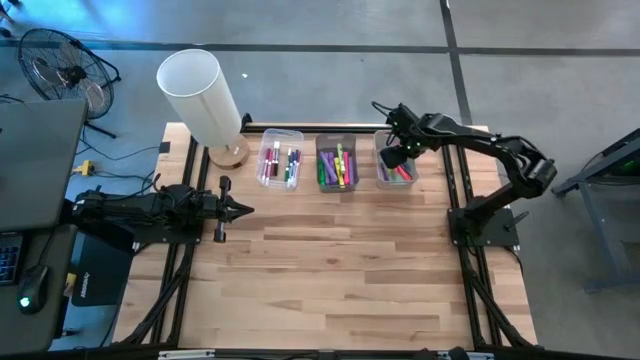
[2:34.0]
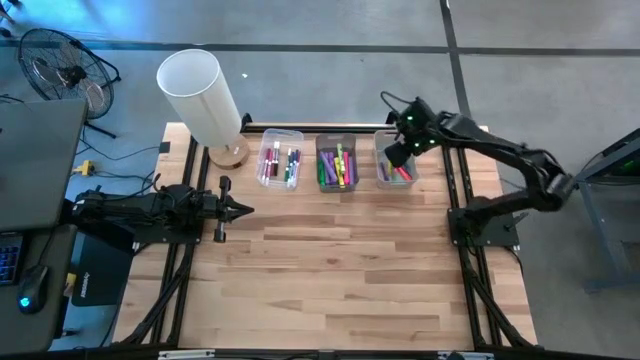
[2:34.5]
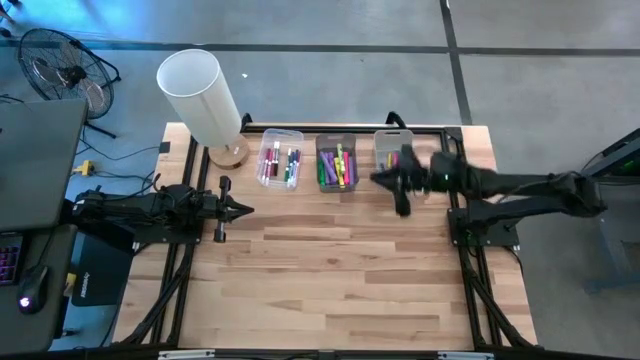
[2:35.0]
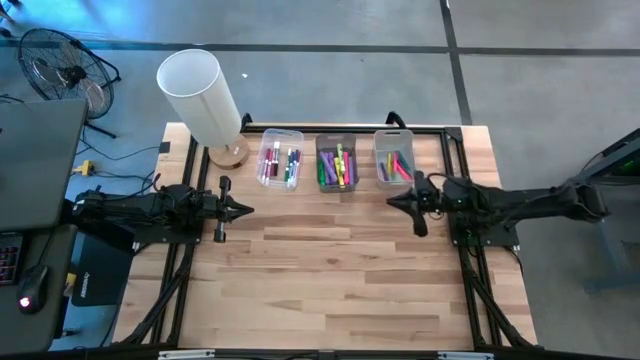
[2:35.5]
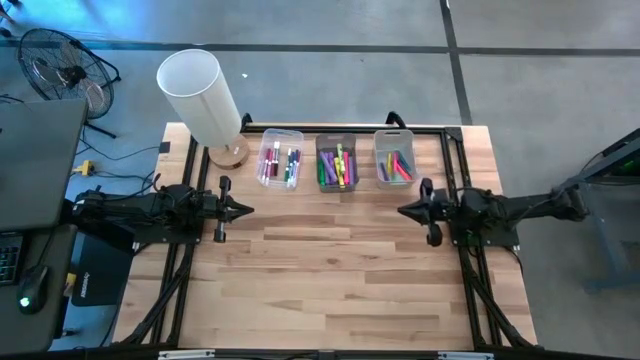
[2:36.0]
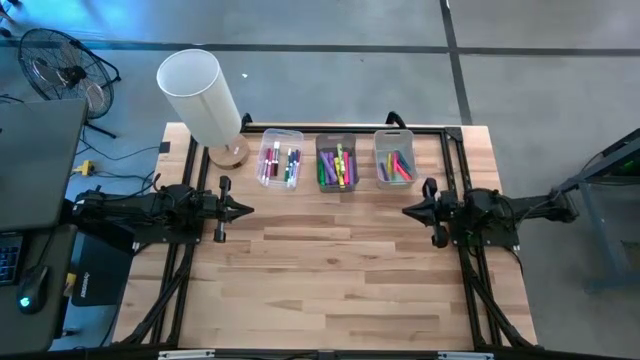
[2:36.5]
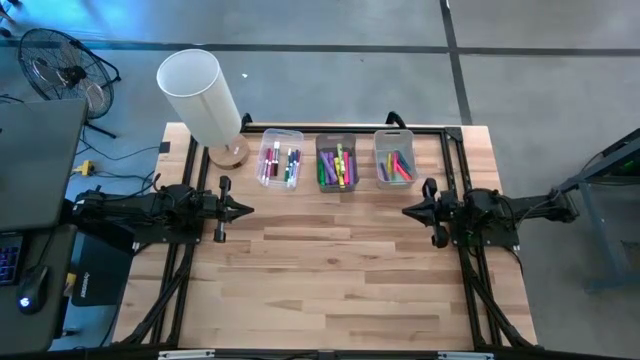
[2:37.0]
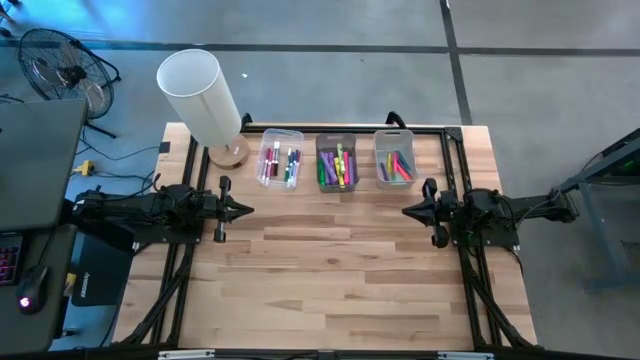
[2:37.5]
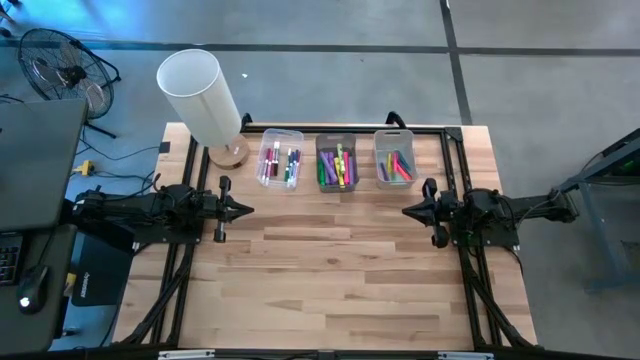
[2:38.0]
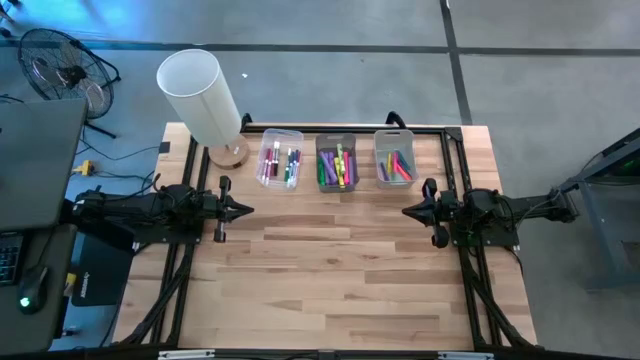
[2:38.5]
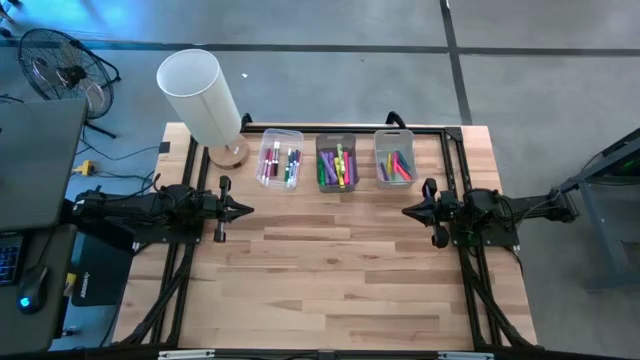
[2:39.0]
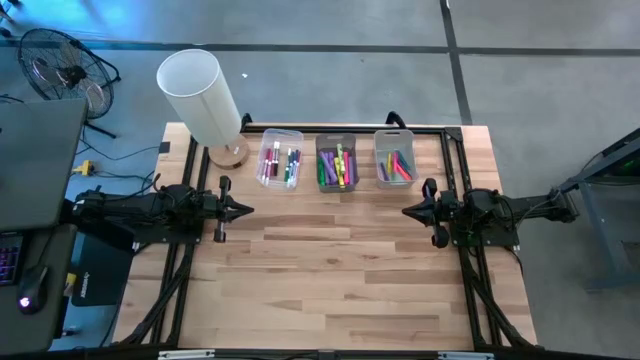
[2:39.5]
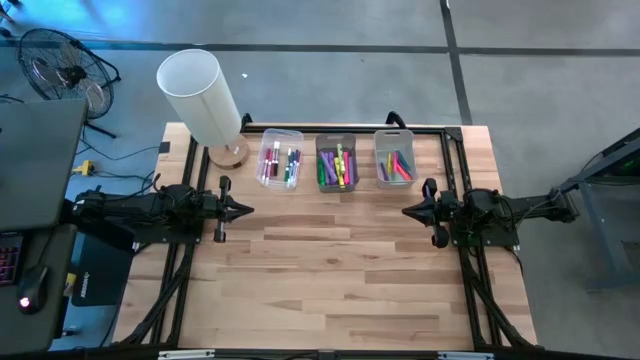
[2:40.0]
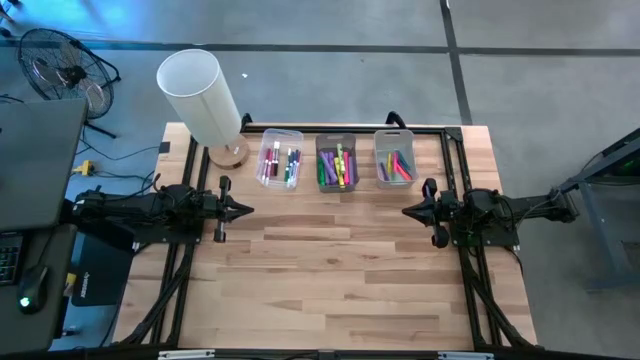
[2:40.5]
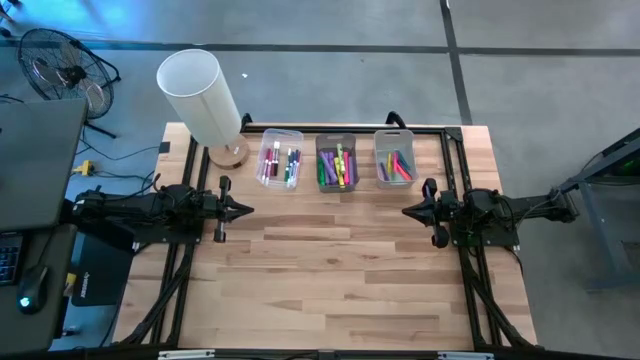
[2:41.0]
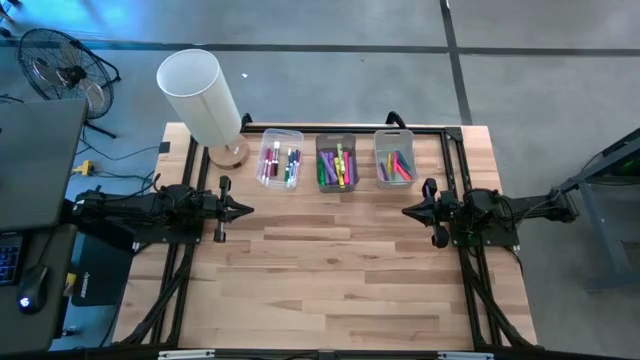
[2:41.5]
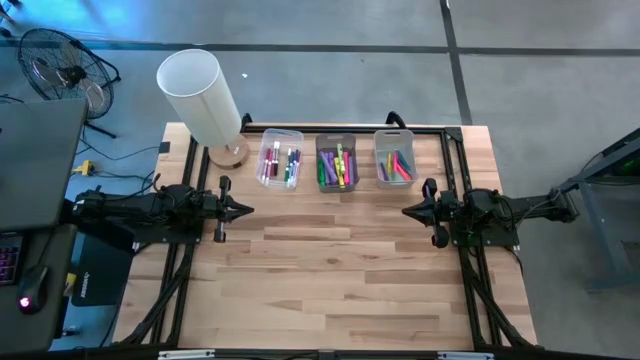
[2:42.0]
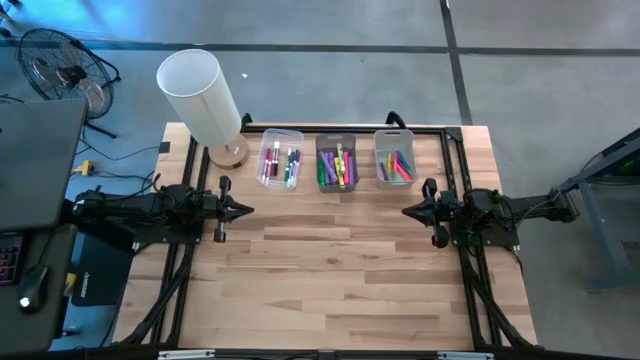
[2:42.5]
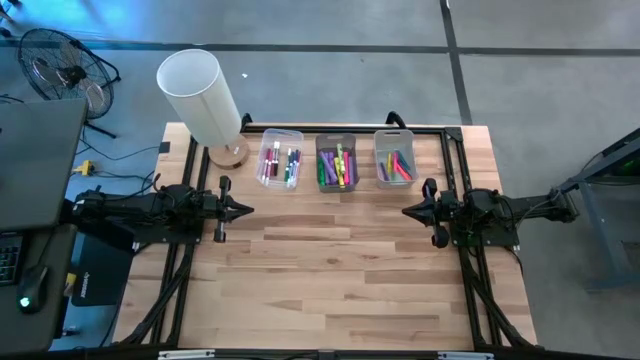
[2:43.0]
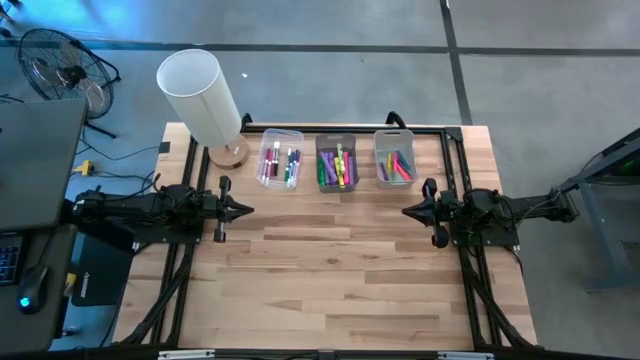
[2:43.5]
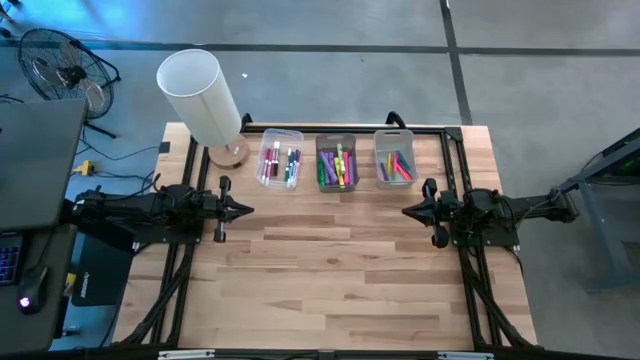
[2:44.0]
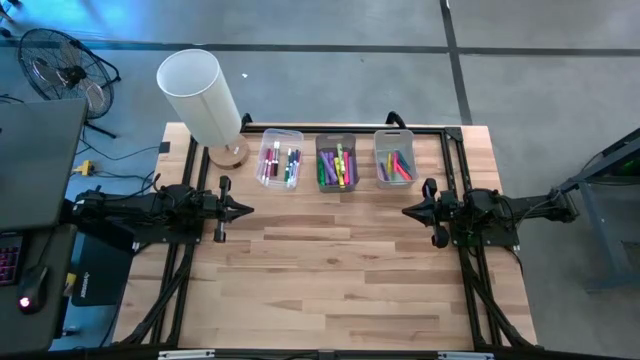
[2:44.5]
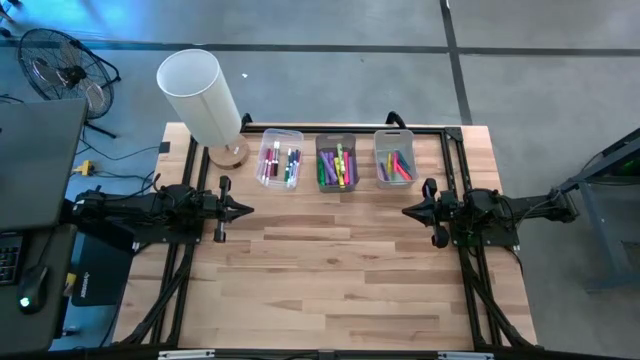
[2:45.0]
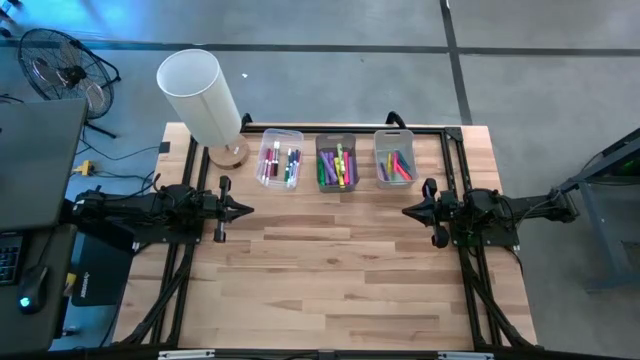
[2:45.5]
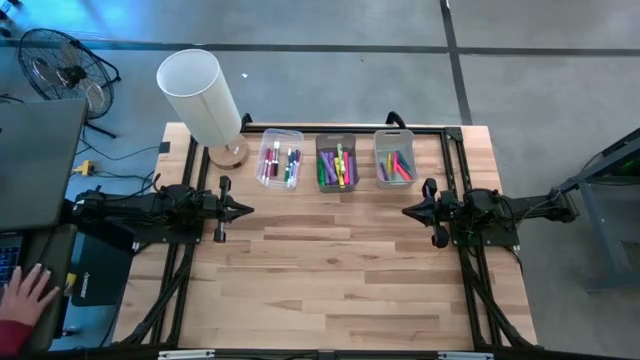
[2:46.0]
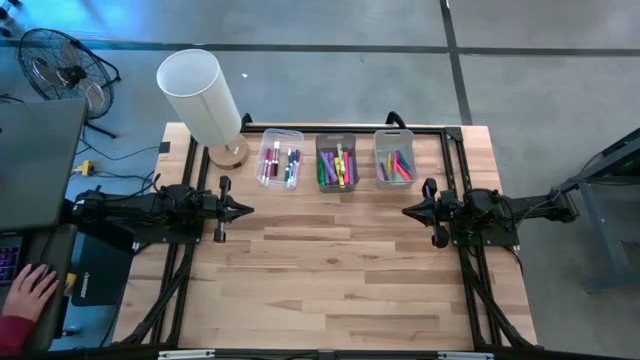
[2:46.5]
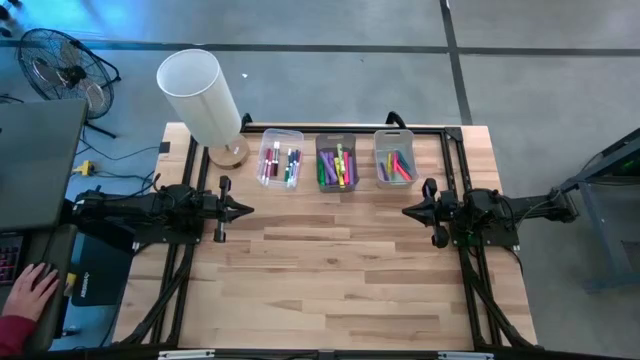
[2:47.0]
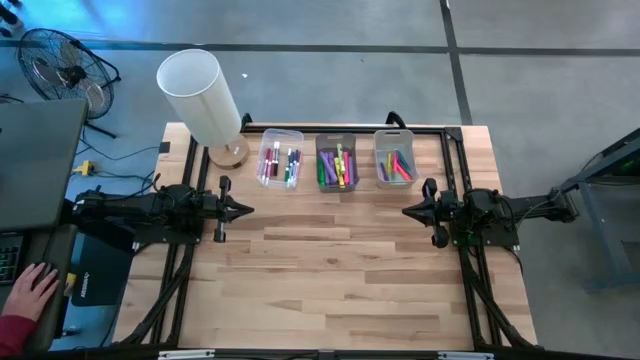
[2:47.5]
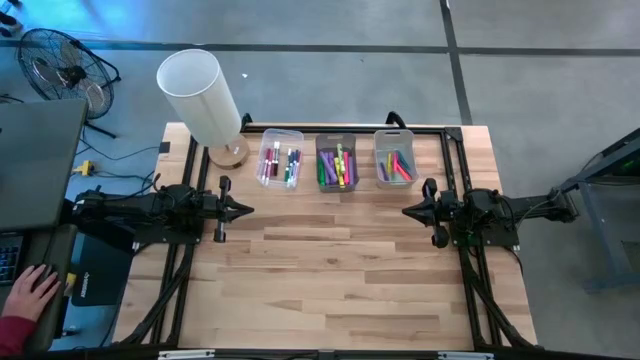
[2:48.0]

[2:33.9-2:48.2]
Task: Pick & Place Markers
Return to Home Position

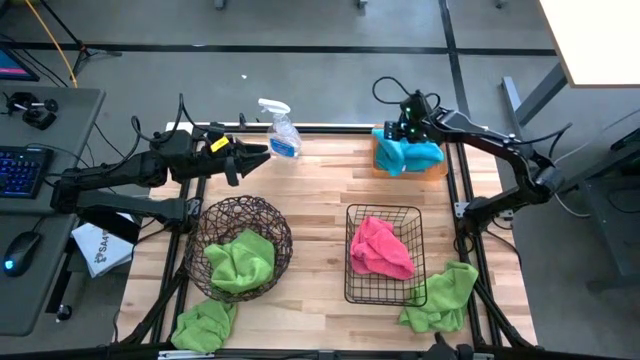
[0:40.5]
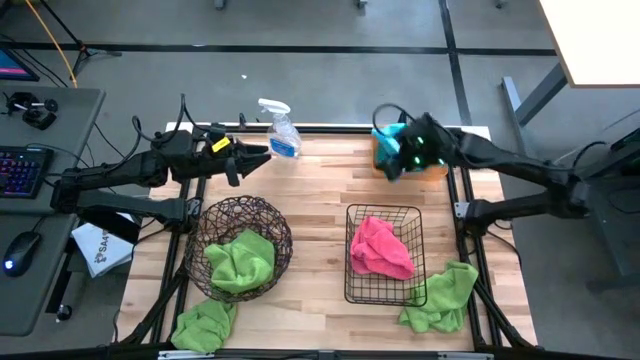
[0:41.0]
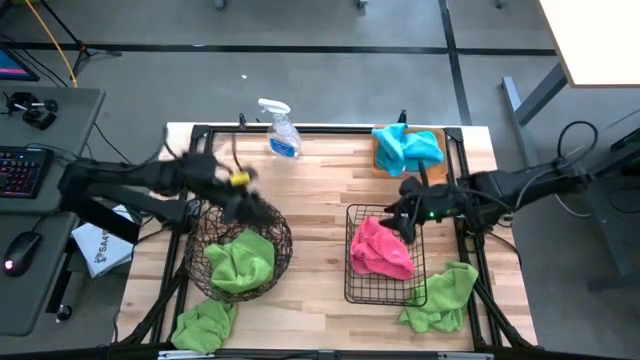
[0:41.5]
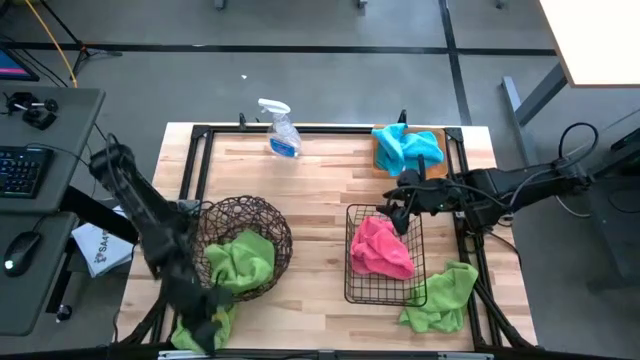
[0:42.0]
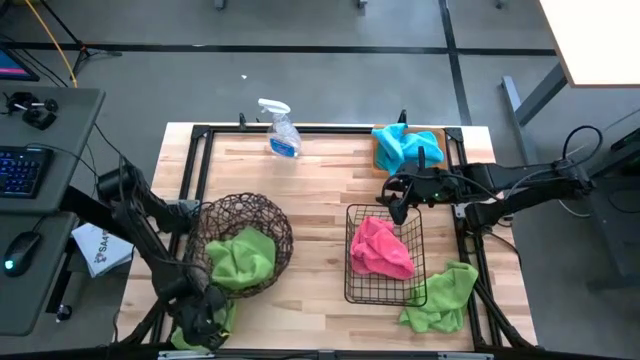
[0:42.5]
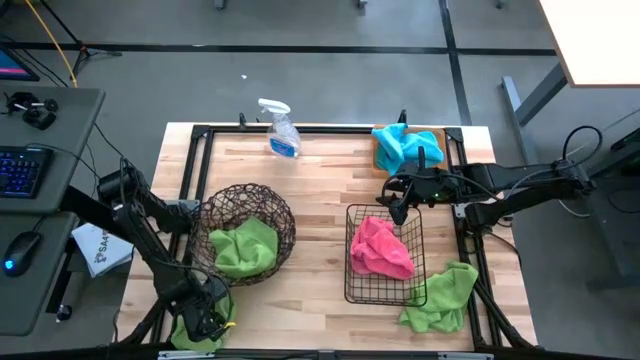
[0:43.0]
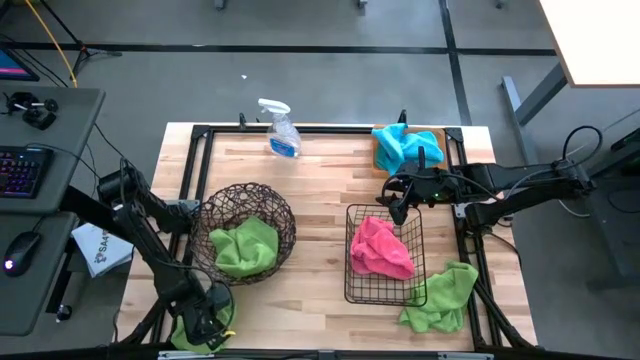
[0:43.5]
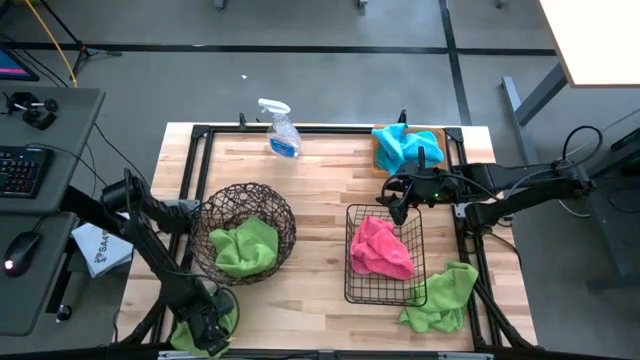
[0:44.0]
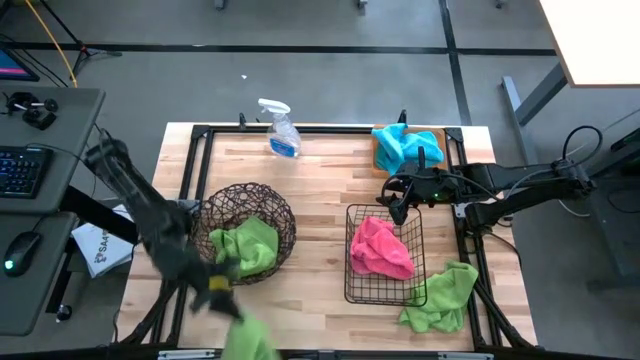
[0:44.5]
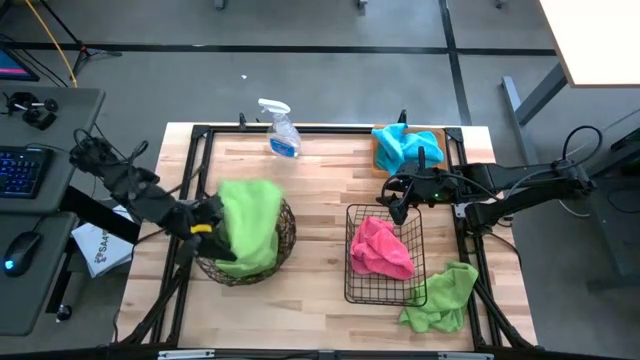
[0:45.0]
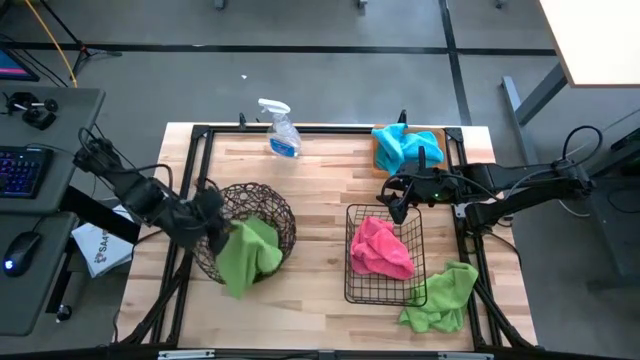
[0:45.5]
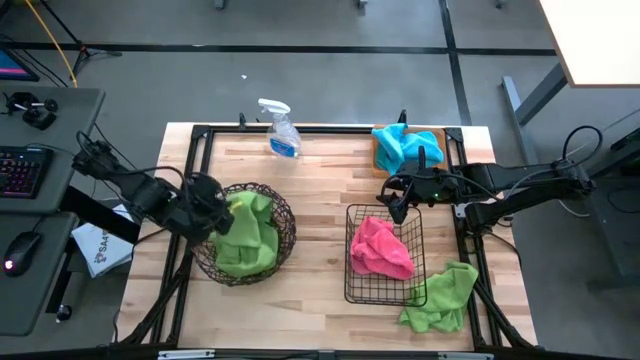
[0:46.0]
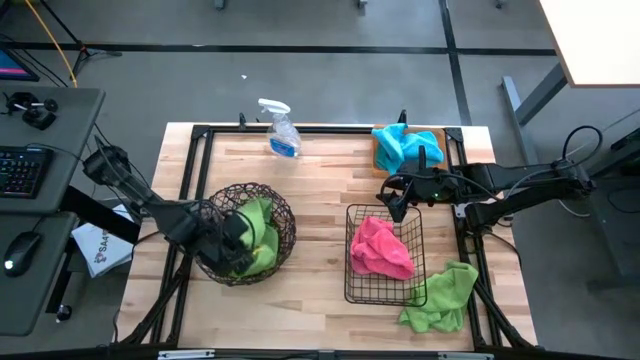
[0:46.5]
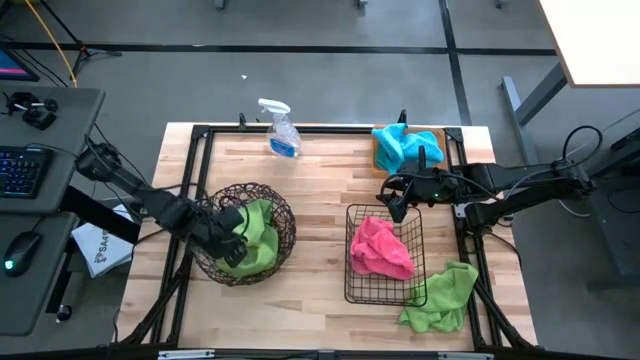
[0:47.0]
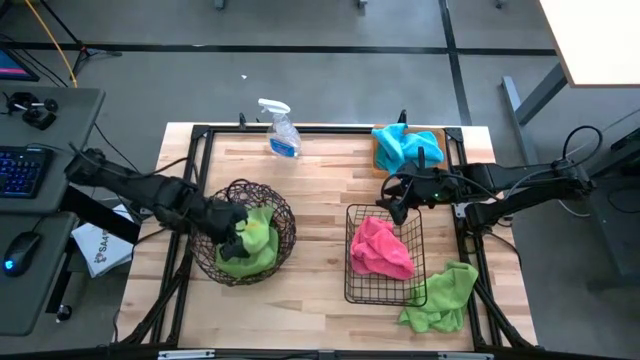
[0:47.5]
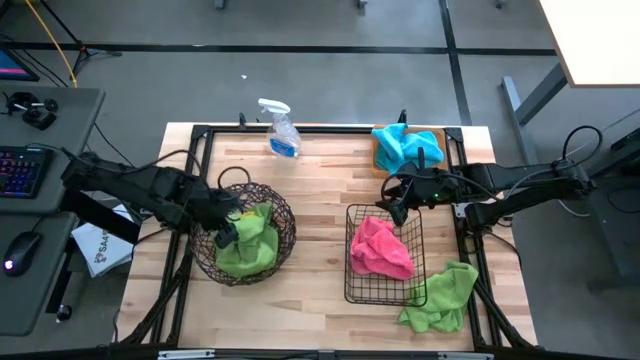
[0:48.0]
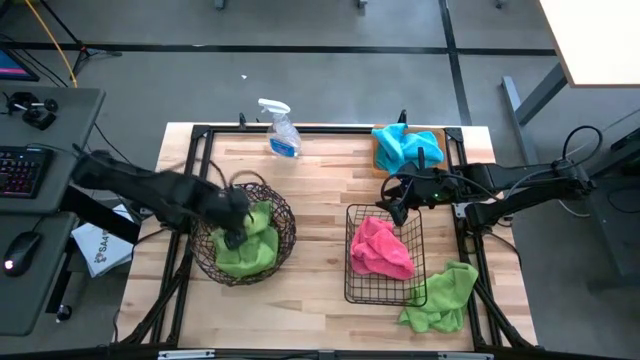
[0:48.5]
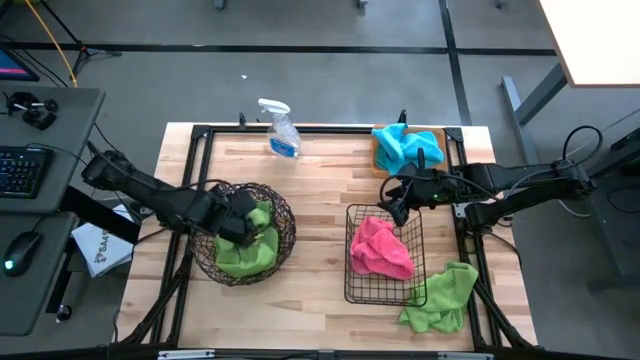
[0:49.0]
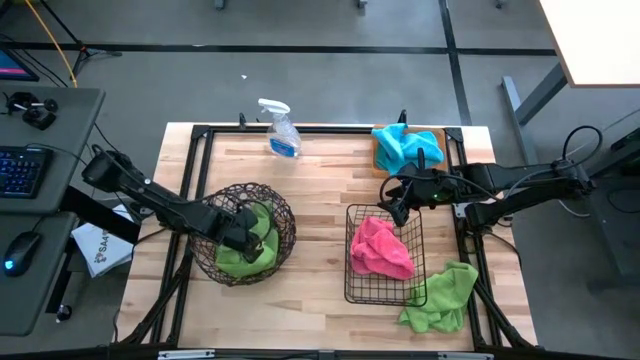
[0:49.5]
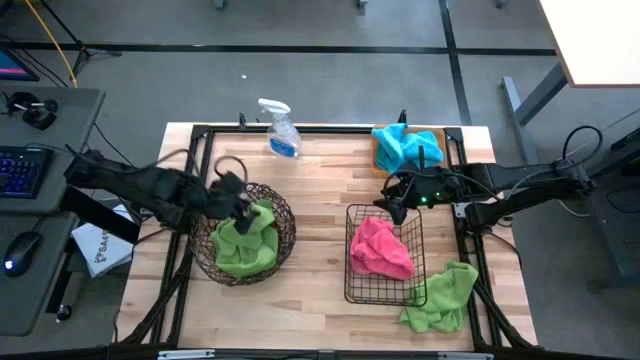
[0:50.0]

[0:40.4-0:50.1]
Task: Sort microfiber towel by color & place in baskets
Put the bottom left green towel into the round wire basket
